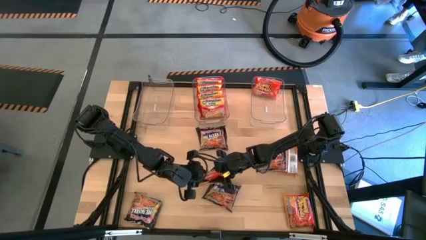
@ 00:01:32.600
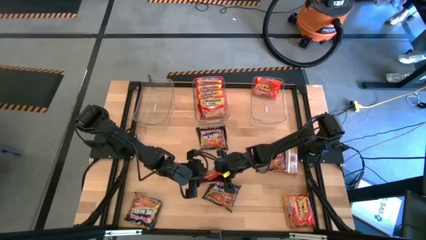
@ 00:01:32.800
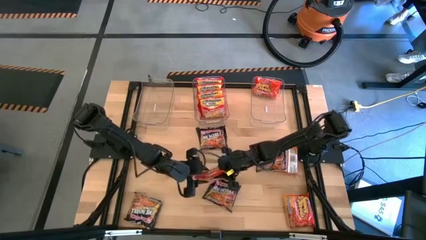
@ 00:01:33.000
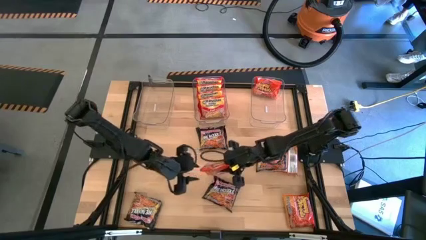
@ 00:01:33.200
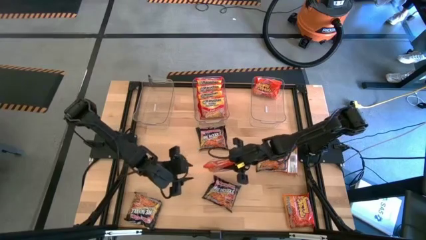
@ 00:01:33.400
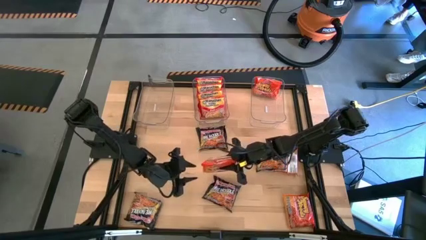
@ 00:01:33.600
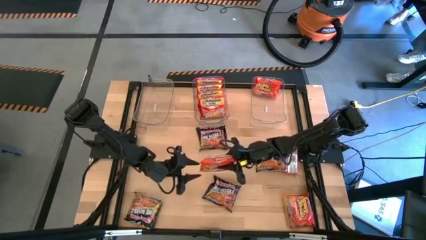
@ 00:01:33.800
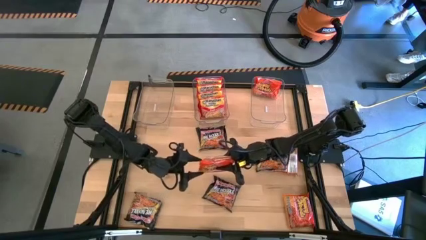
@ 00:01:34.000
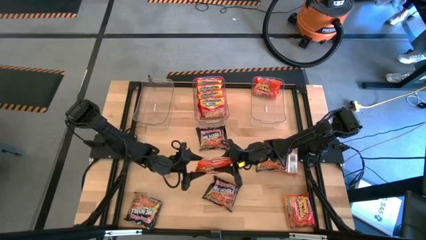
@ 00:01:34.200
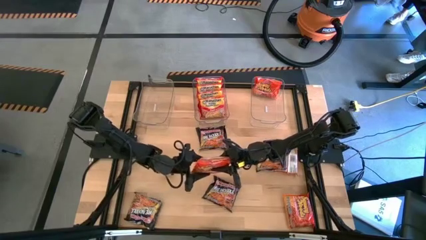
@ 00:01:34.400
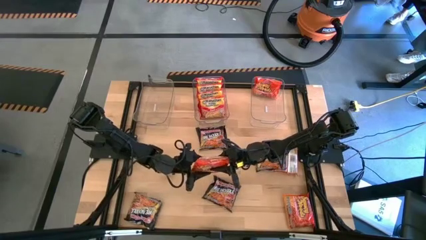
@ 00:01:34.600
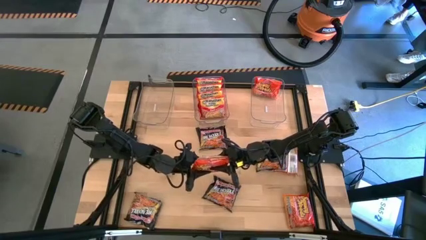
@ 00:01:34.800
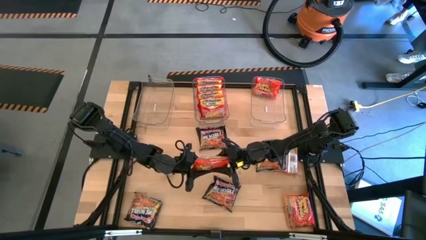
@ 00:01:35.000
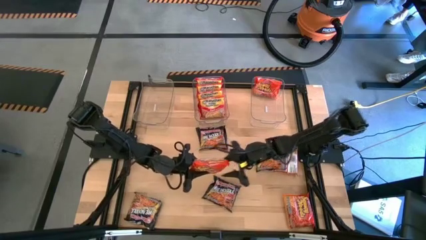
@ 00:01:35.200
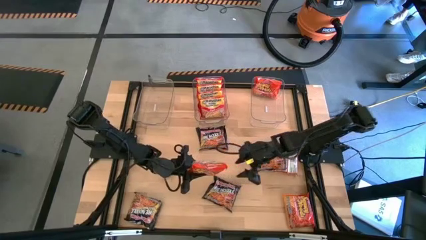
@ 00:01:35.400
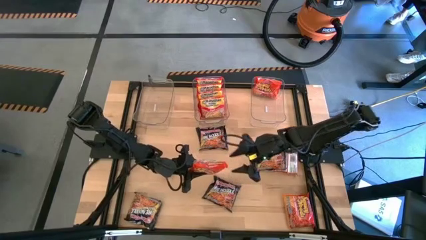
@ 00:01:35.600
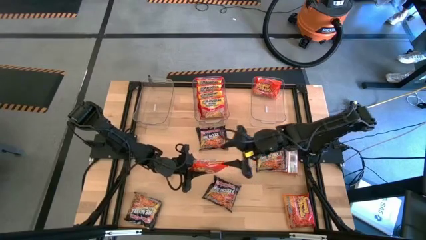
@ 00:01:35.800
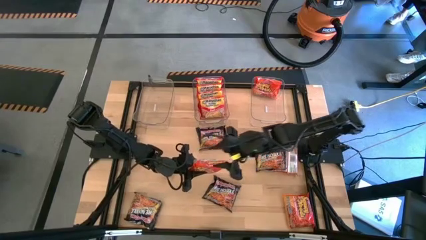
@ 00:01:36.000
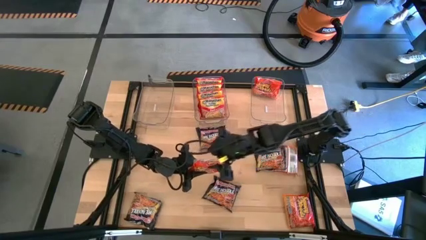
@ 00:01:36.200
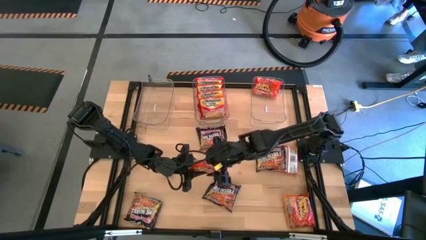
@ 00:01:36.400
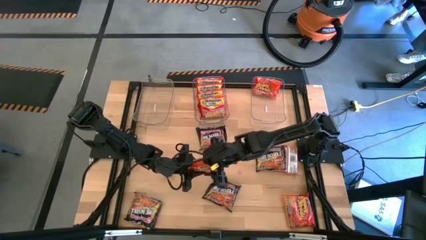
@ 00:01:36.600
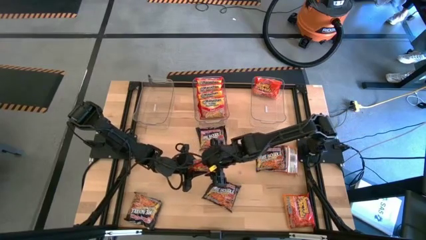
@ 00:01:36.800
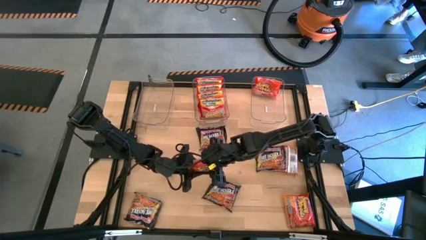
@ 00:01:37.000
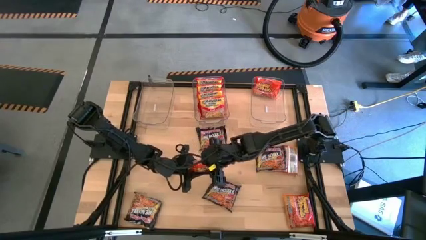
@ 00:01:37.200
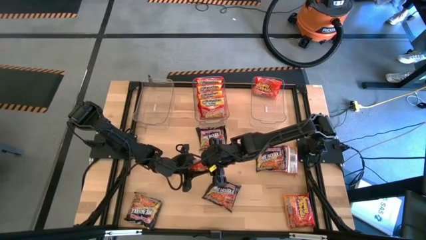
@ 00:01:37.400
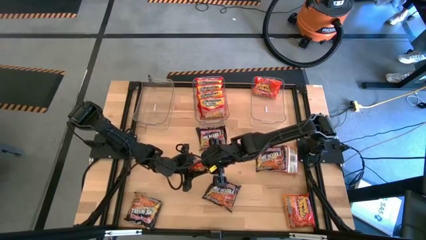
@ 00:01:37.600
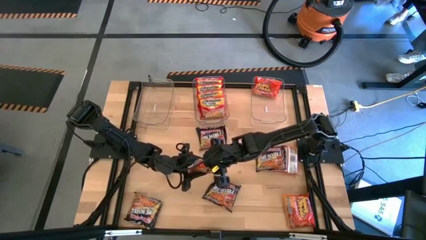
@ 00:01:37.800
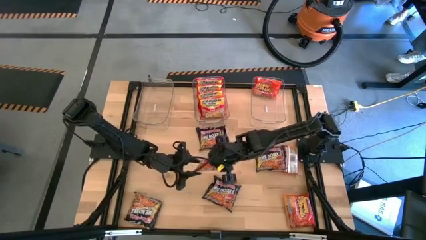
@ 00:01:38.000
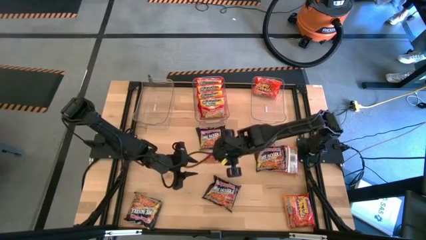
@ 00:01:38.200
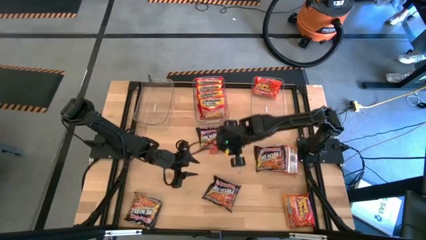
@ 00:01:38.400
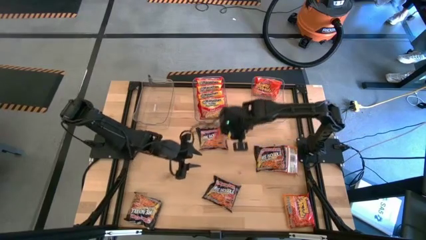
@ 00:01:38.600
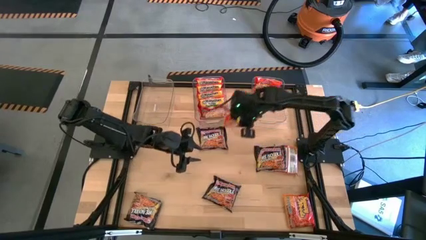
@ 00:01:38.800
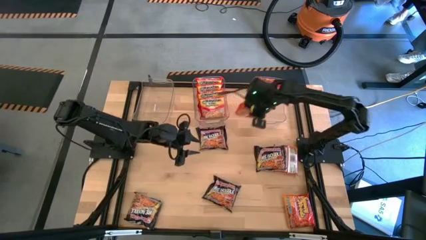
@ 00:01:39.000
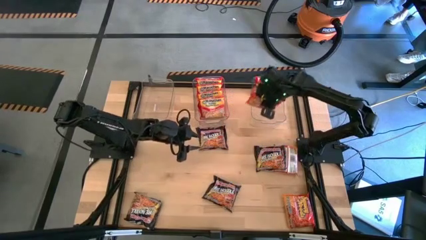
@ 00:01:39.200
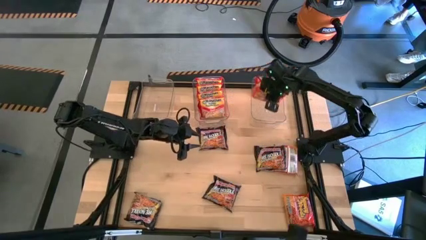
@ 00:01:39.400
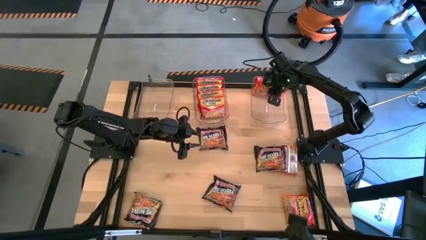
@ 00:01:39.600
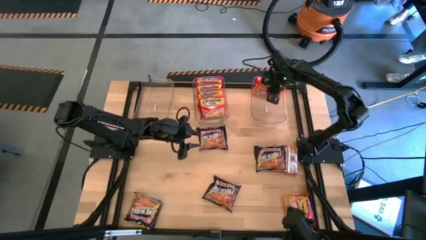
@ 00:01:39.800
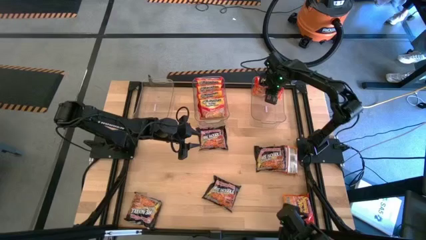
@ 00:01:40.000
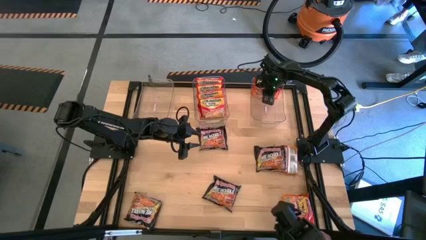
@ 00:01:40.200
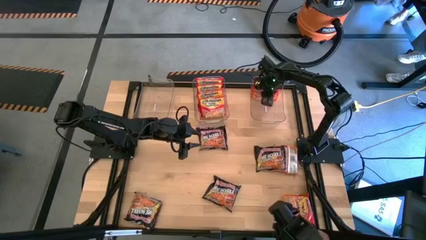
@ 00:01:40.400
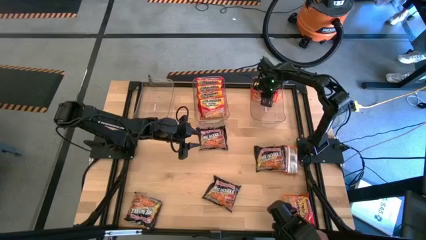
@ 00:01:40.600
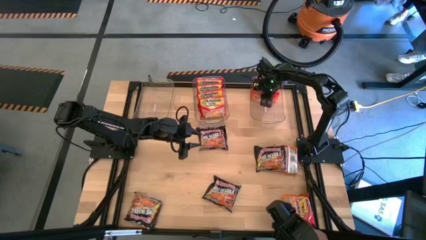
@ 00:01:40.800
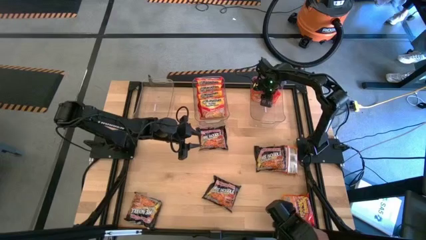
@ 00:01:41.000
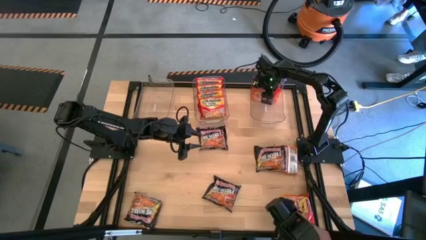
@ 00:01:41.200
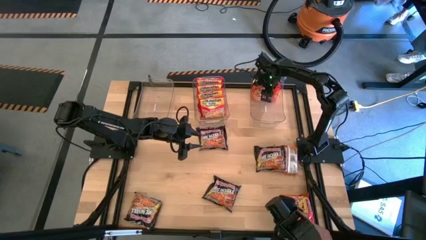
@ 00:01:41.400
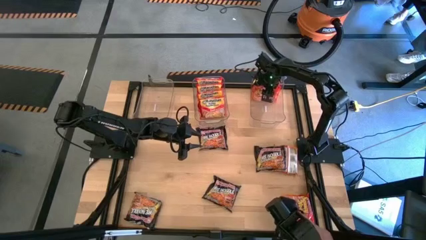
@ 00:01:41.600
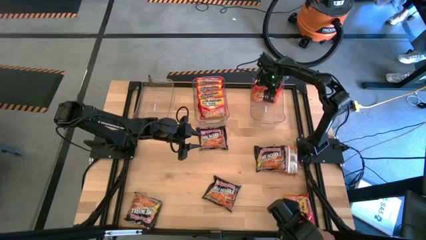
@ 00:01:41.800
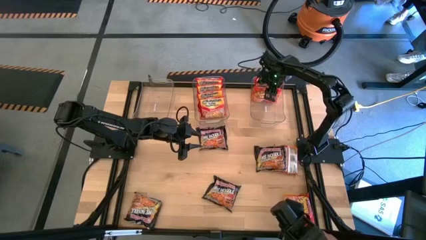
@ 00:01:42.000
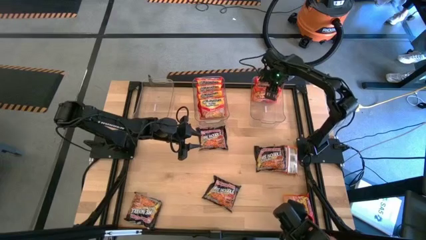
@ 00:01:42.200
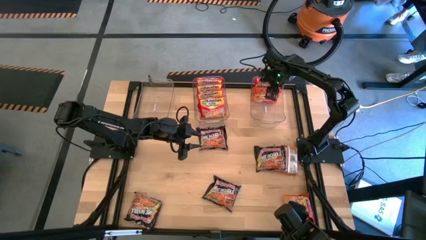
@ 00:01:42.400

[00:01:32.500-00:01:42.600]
Task: Sort Maruchan noodles
Put the top left orange noodle pack into the right transparent bin

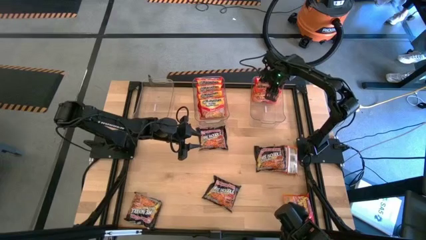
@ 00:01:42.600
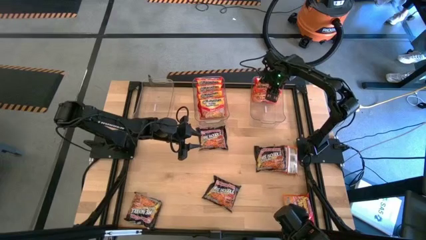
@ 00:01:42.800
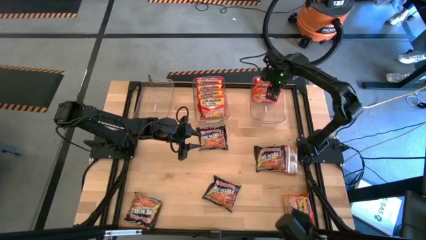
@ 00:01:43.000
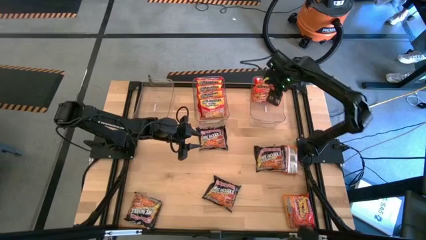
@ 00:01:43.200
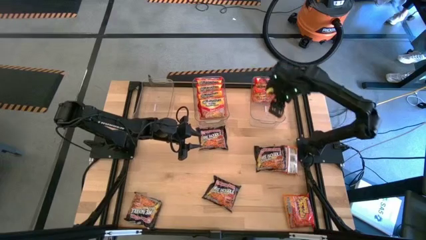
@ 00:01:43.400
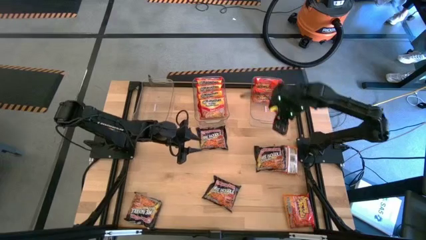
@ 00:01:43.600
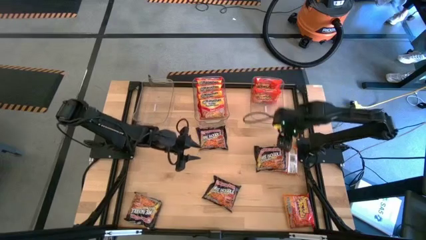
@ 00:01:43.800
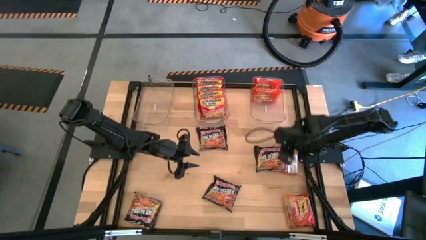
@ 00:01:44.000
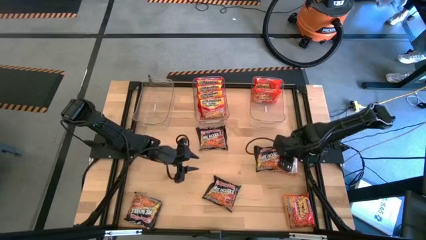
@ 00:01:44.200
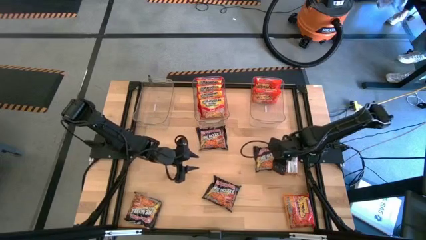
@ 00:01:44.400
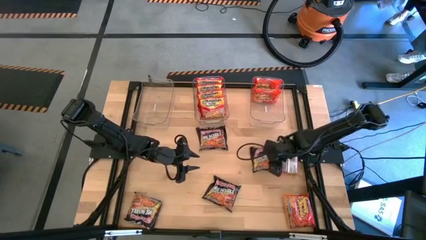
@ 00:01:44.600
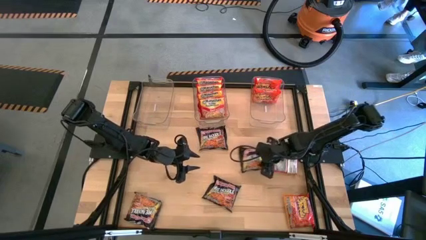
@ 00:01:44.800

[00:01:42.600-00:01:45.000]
Adjust the top right black noddle pack

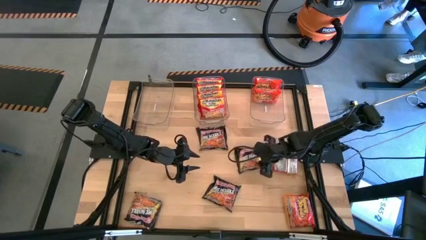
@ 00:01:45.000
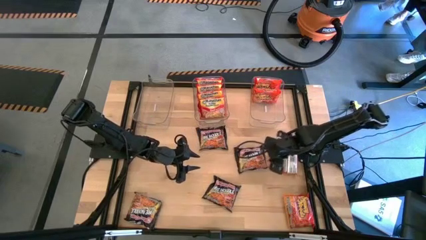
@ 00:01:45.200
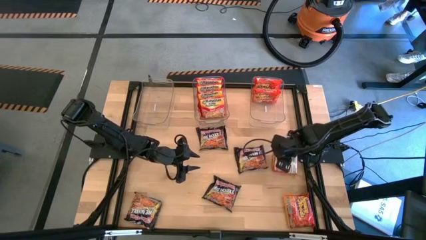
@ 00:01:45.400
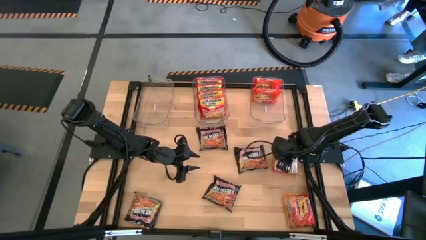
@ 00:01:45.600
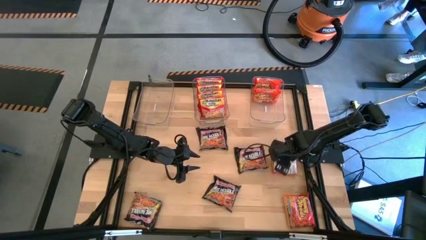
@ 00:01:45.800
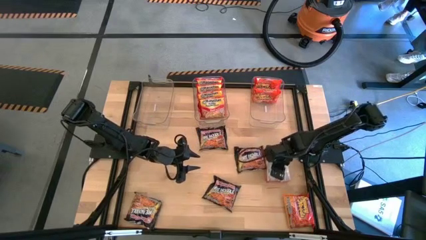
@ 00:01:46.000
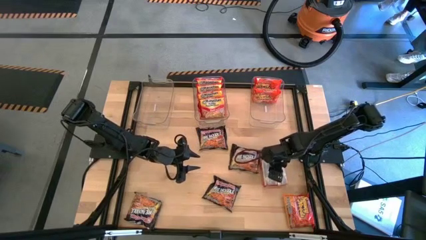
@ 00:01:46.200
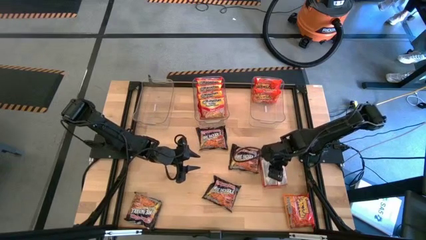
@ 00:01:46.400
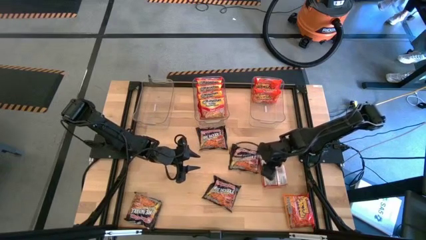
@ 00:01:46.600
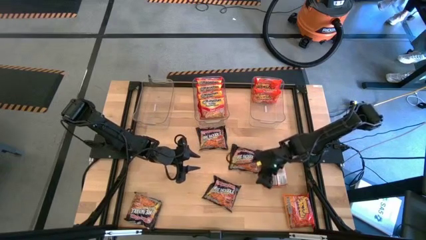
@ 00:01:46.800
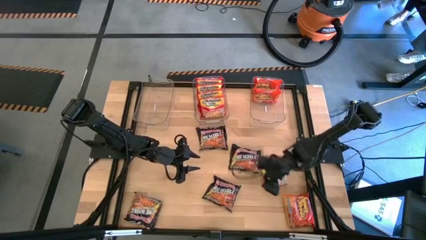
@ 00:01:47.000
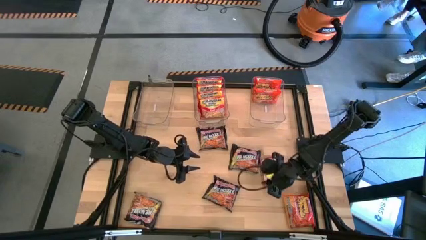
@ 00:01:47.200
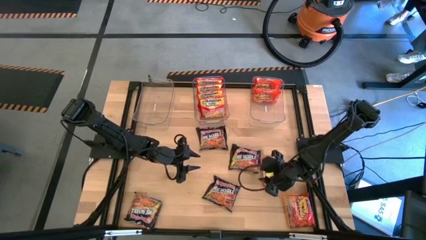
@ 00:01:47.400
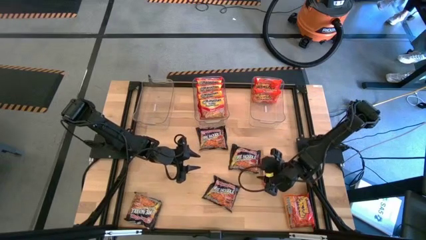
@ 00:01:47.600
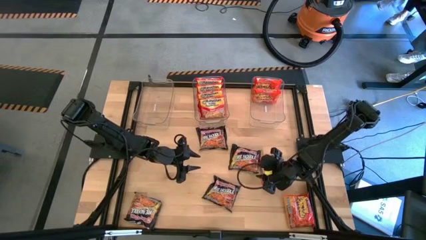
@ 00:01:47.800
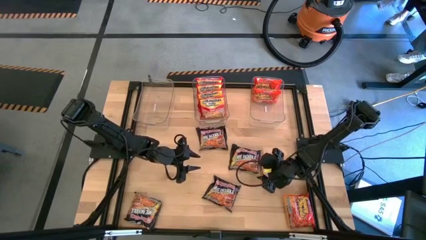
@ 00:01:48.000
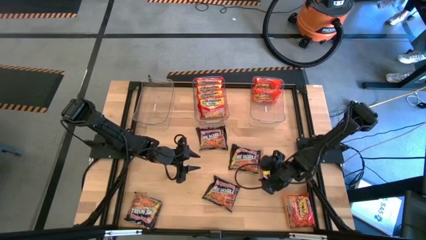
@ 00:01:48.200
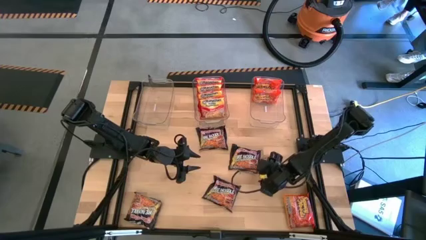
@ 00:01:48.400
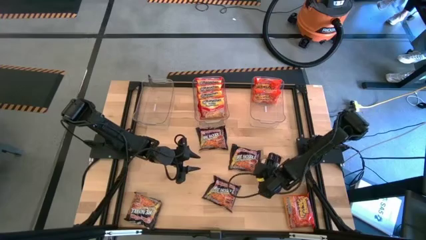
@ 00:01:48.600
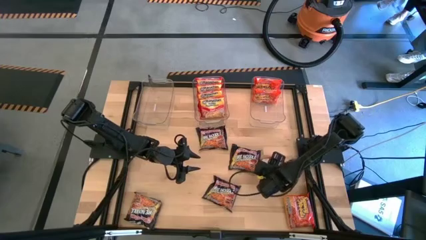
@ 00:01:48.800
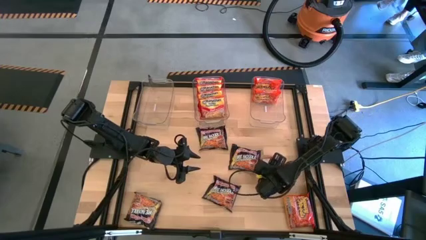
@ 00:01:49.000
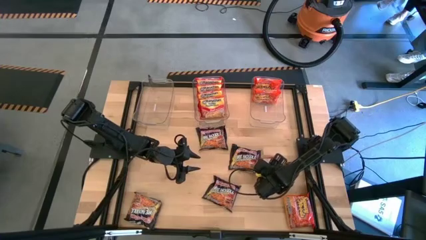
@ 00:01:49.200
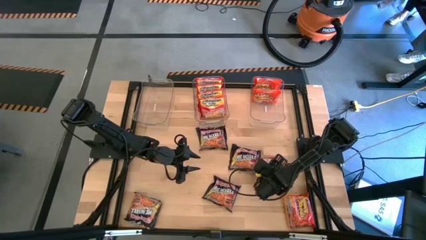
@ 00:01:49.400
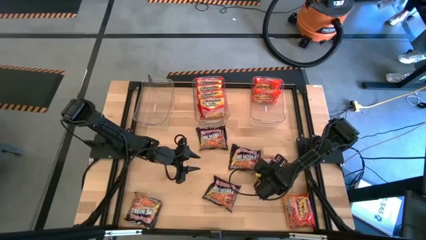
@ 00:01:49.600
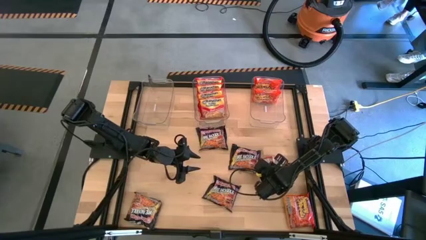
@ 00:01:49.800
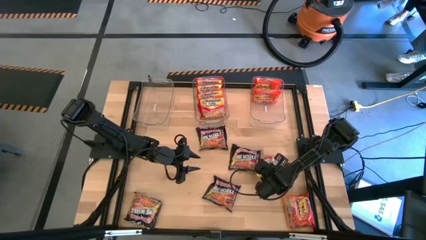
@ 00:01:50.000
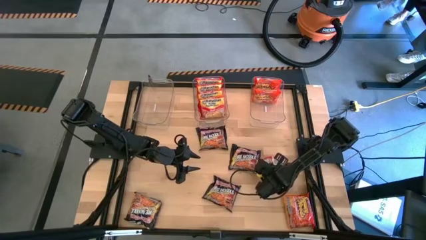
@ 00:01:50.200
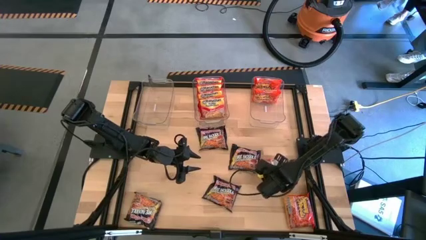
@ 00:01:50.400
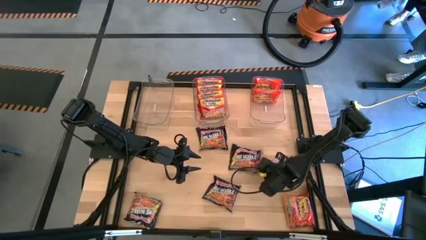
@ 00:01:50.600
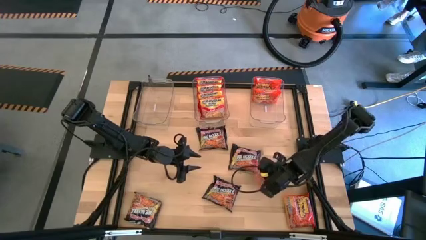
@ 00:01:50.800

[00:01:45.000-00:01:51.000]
Put the top orange noodle pack into the right transparent bin
